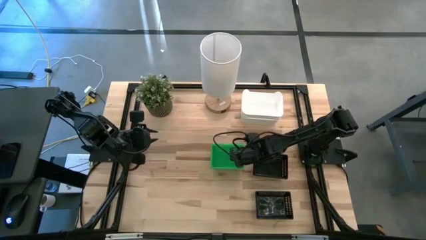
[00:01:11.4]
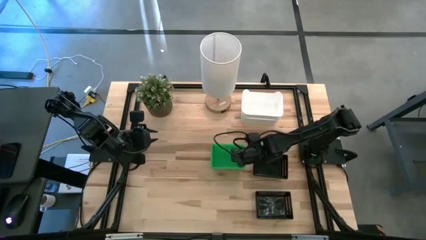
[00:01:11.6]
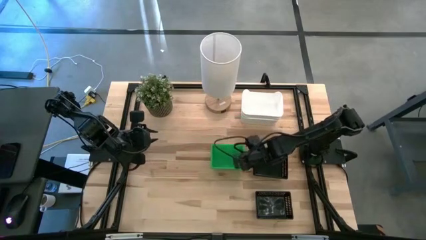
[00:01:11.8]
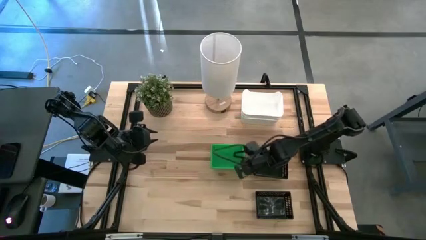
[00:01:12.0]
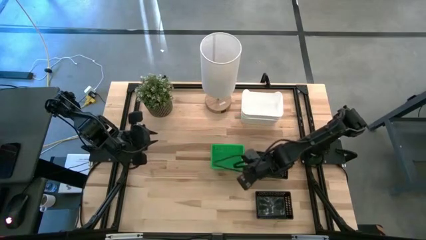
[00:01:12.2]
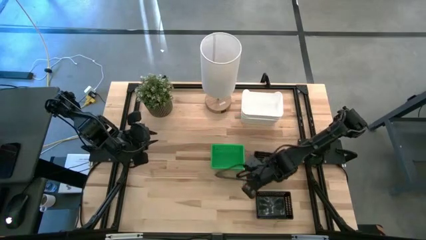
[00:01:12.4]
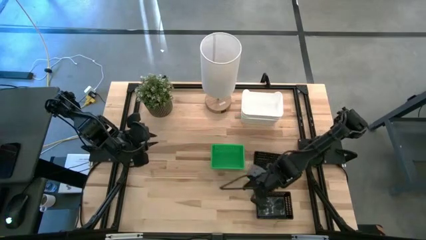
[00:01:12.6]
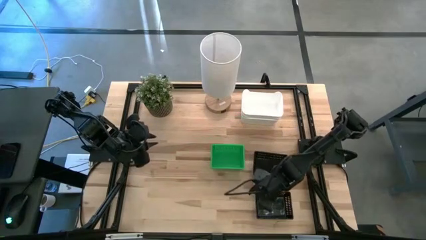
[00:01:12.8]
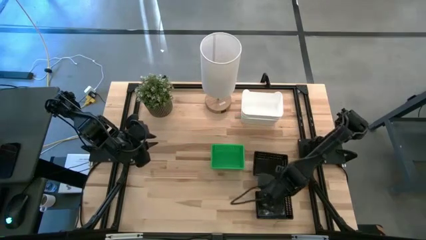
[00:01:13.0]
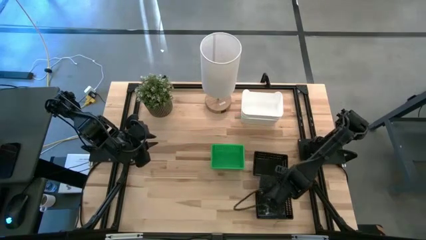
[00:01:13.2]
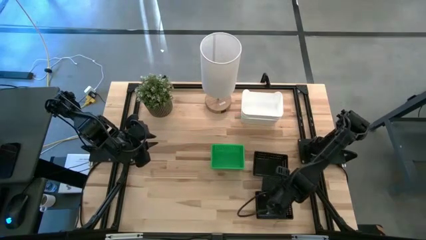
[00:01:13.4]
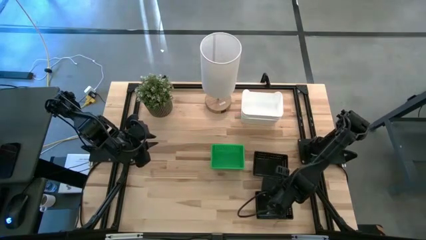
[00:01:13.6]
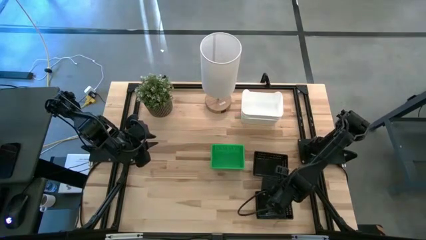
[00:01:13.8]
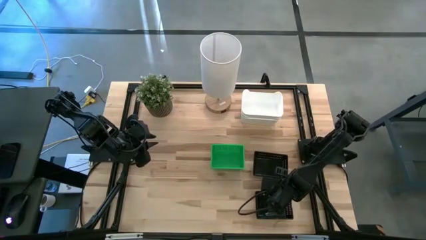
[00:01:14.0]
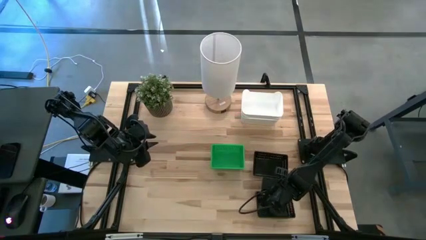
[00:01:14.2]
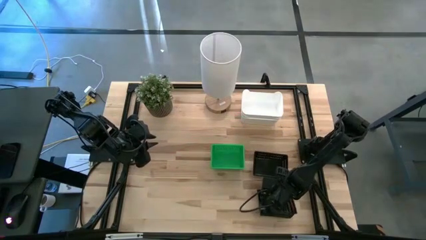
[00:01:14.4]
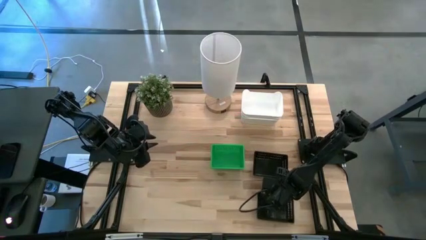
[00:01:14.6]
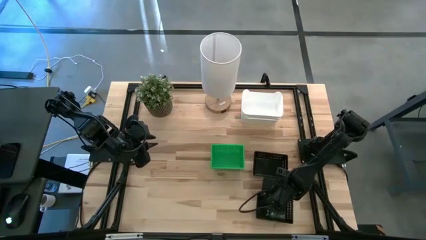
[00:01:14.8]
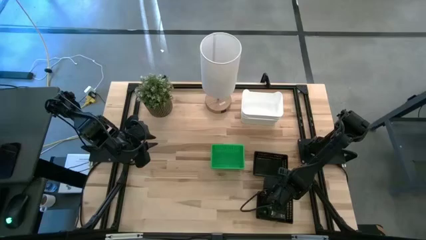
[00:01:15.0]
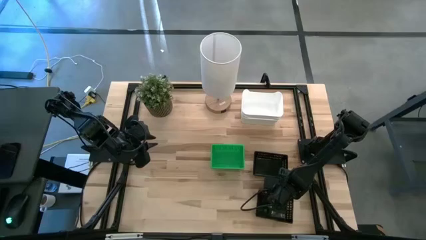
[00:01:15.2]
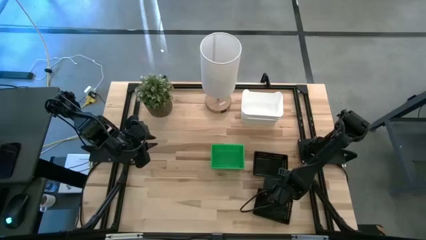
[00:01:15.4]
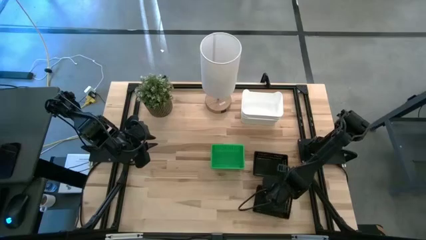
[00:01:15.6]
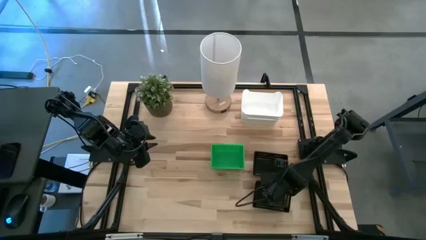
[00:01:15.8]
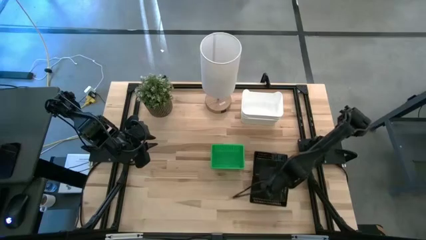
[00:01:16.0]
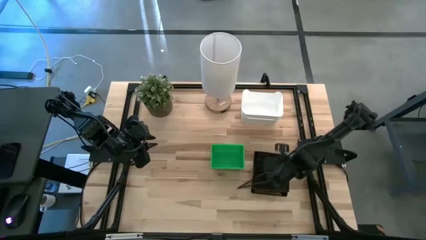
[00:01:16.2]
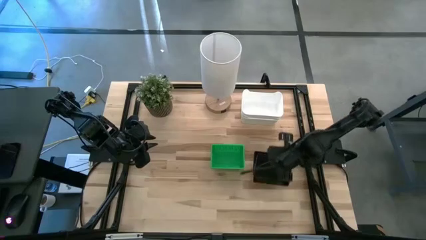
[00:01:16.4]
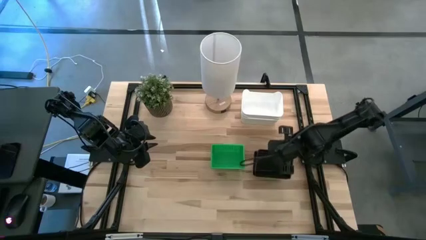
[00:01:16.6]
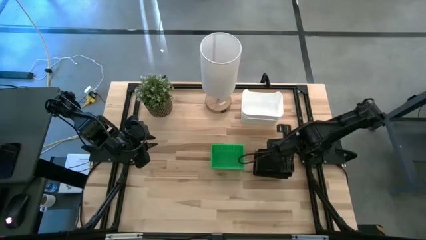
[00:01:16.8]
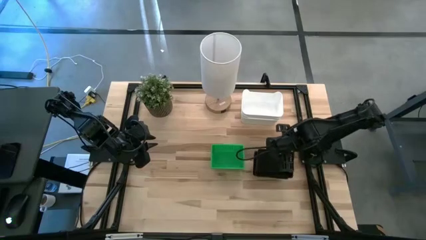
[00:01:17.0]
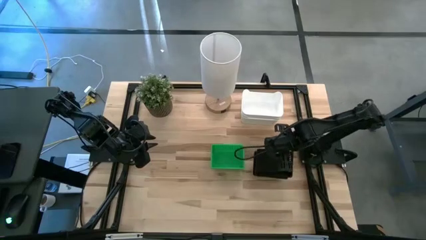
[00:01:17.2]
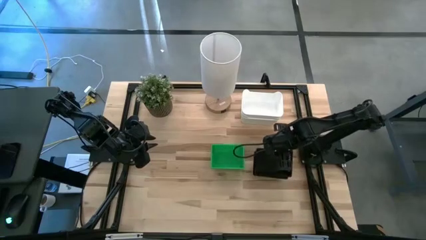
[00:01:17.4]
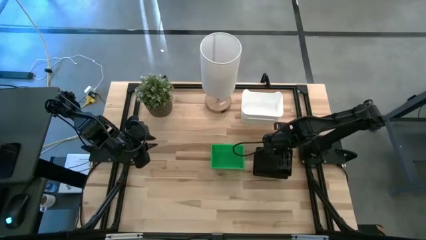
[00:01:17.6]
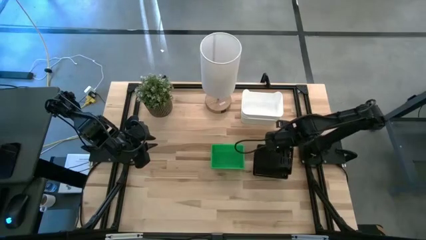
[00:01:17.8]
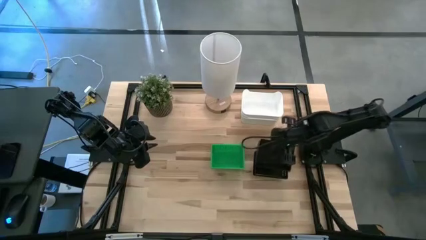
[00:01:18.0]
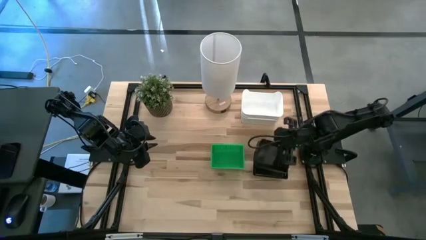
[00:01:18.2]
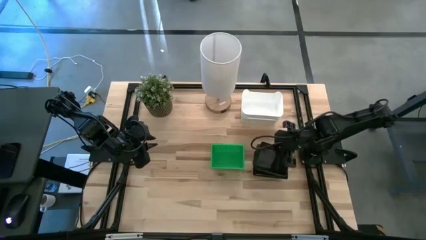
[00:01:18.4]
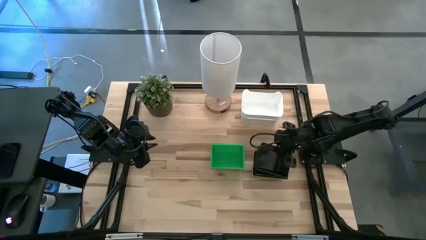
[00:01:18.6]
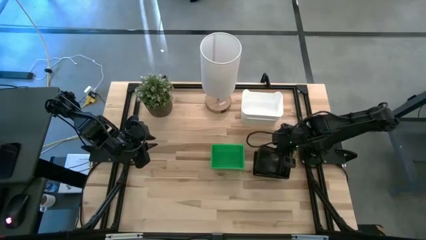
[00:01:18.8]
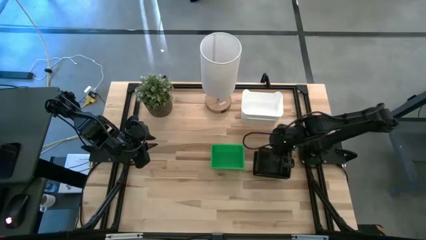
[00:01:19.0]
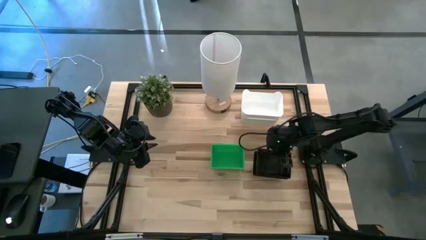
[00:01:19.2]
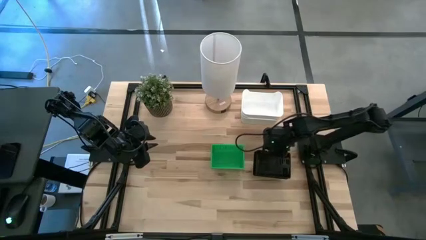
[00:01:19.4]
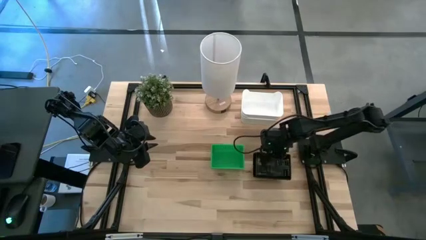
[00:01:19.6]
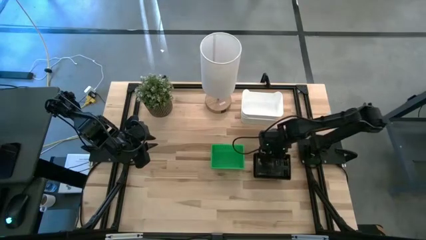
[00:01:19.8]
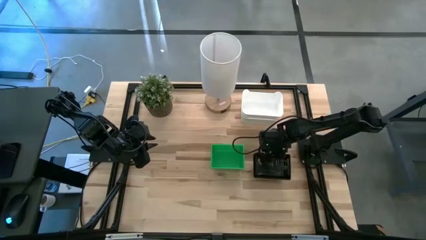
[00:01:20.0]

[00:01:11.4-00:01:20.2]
Stack the black bin on top of the stacked black bins

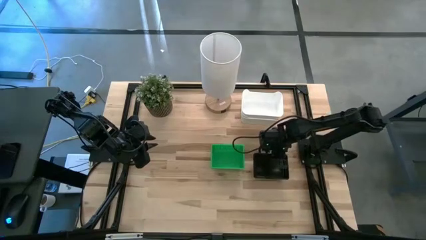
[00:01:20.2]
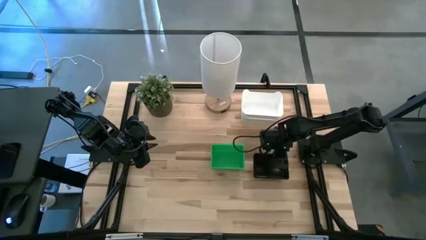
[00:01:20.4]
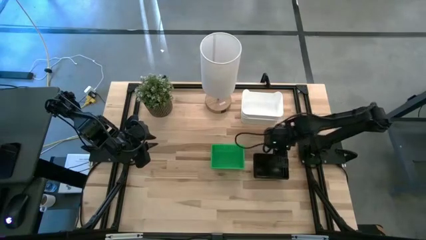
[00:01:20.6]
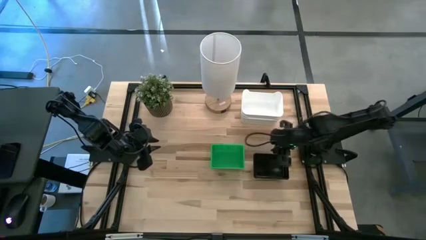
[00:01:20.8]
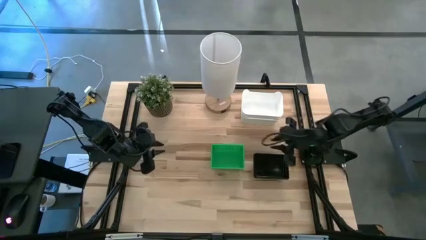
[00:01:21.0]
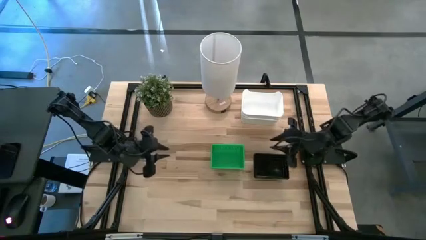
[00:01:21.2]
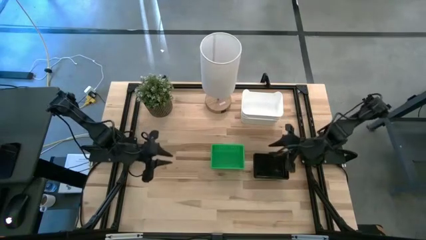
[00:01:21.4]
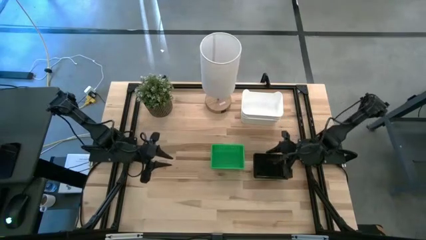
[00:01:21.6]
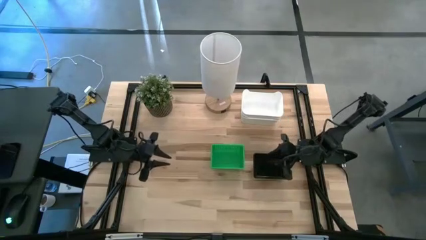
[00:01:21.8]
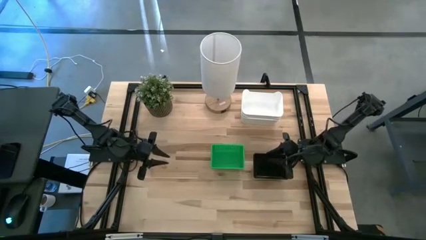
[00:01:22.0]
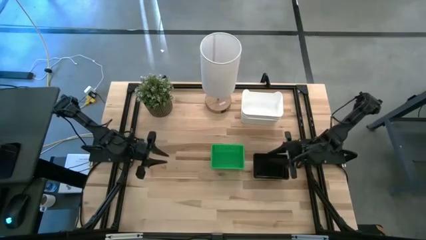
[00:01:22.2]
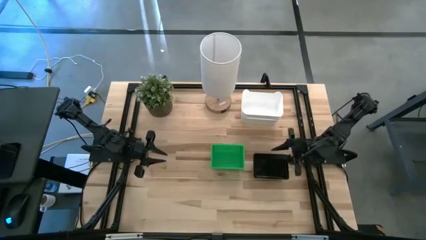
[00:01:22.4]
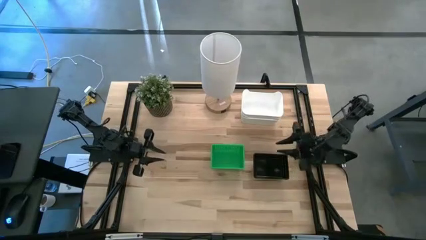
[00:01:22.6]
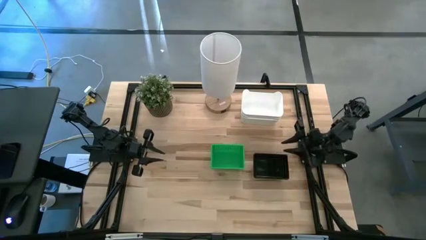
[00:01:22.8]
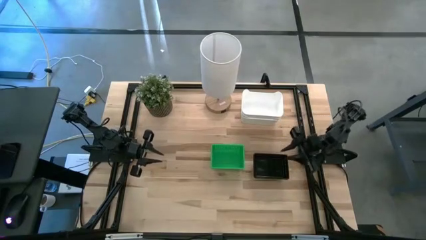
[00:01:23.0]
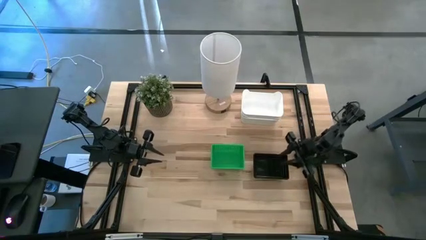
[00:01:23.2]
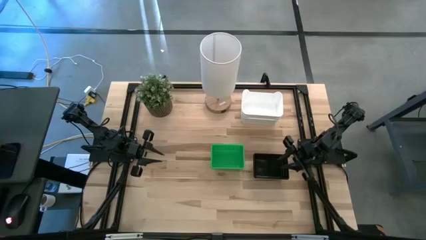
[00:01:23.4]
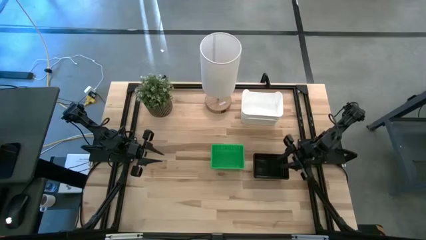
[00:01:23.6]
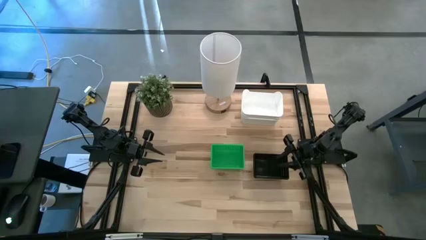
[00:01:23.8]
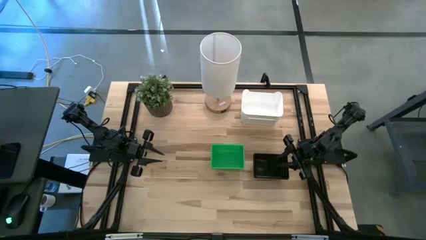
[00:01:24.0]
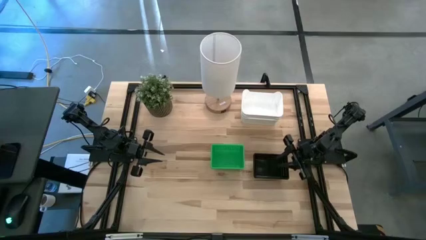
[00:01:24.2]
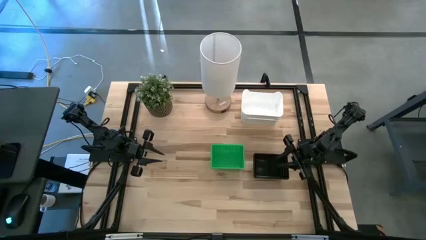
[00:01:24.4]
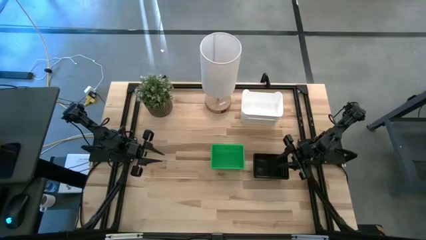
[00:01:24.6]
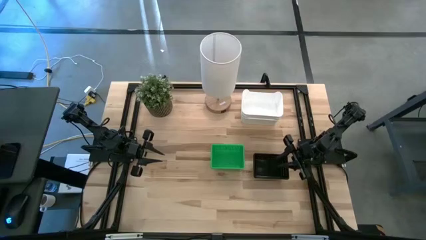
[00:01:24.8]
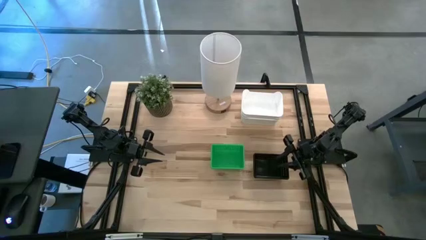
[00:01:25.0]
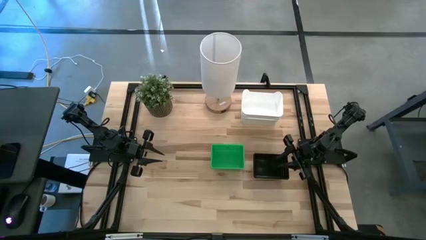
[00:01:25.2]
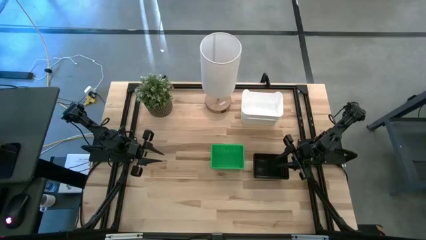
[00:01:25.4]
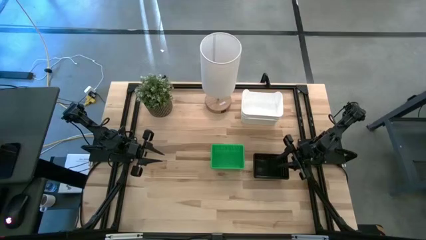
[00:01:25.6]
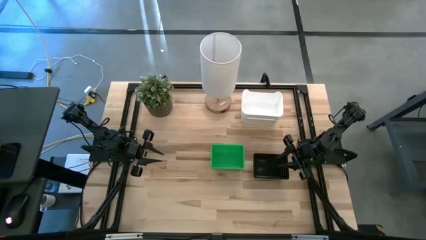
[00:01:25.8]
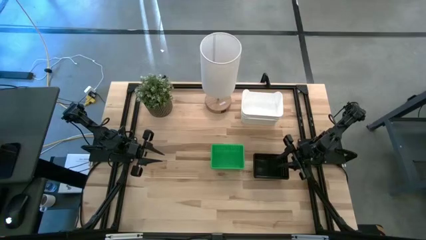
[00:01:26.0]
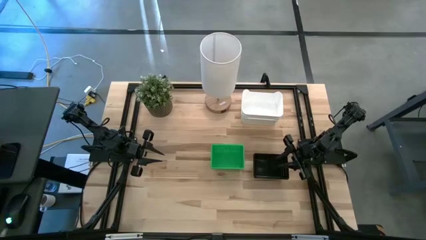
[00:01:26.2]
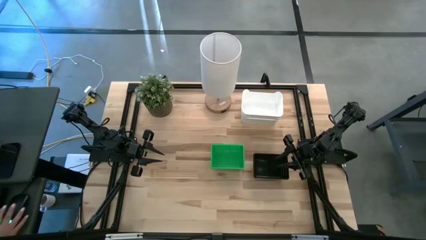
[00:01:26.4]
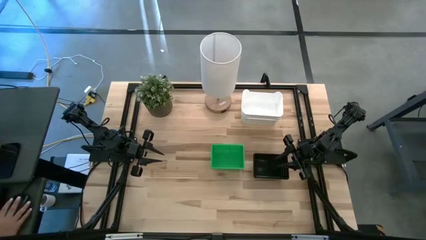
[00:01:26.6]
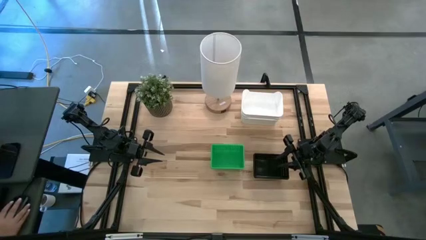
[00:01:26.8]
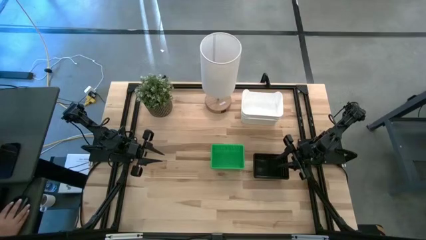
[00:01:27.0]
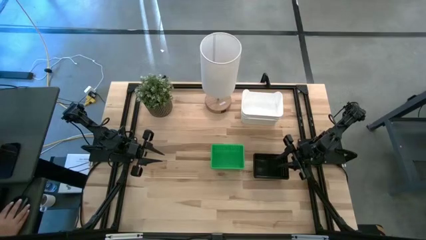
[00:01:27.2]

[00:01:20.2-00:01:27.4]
Return to Home Position
